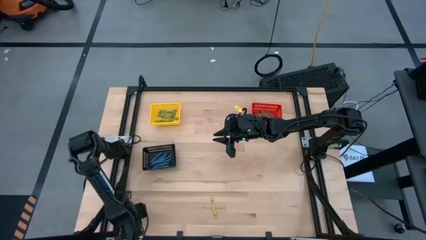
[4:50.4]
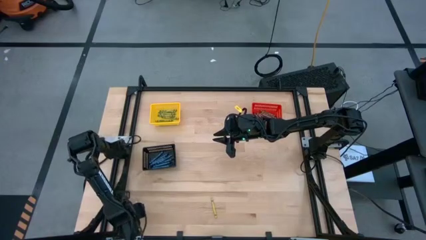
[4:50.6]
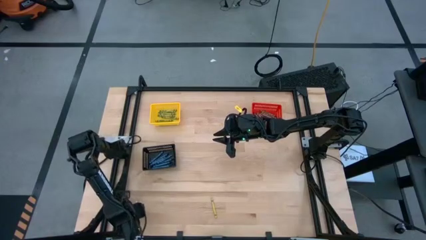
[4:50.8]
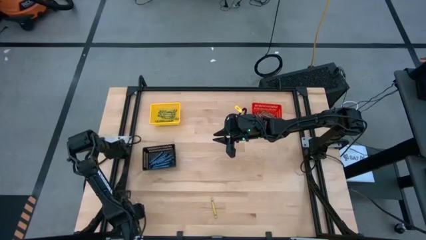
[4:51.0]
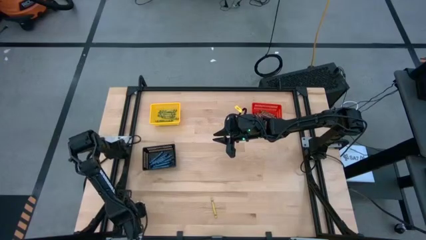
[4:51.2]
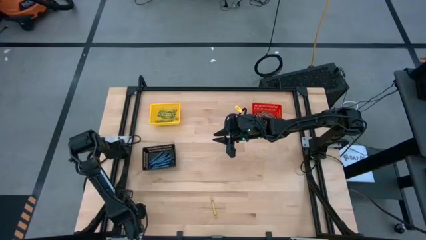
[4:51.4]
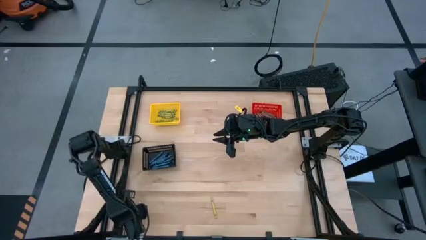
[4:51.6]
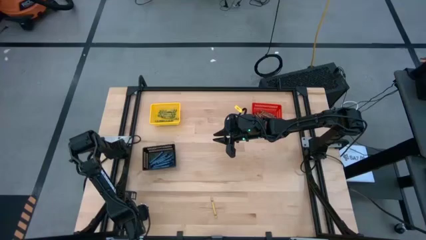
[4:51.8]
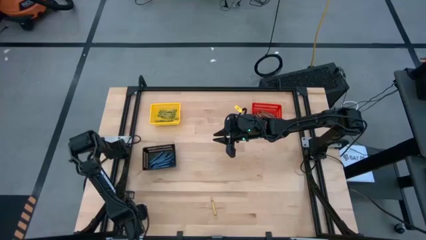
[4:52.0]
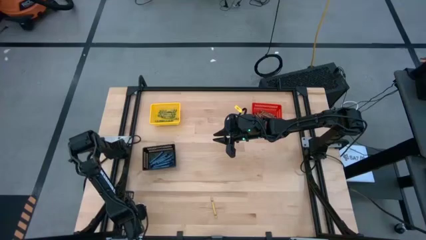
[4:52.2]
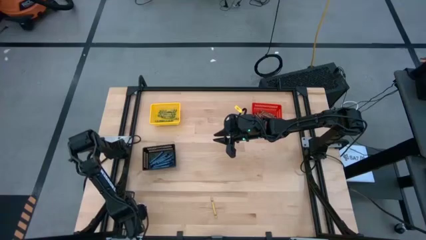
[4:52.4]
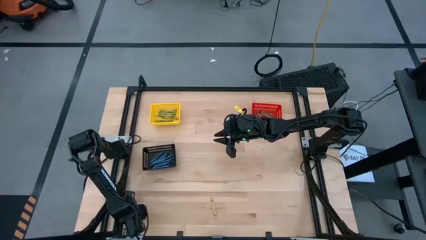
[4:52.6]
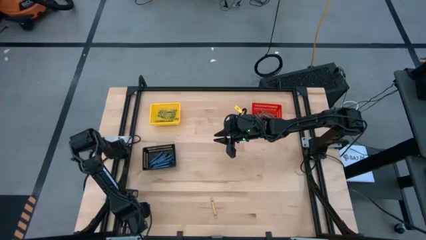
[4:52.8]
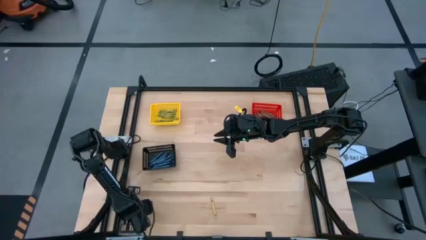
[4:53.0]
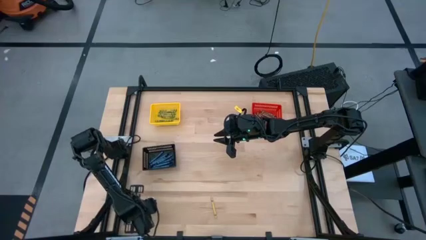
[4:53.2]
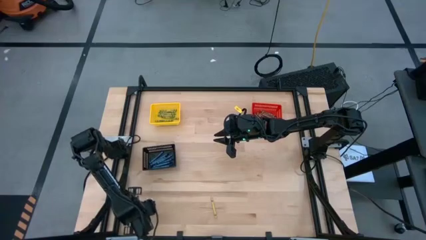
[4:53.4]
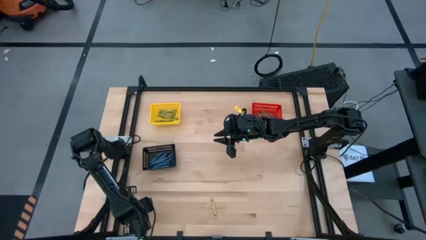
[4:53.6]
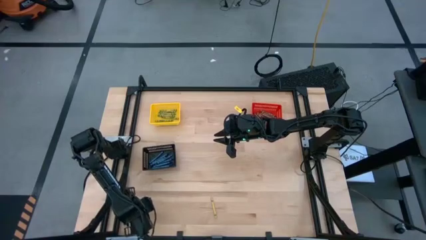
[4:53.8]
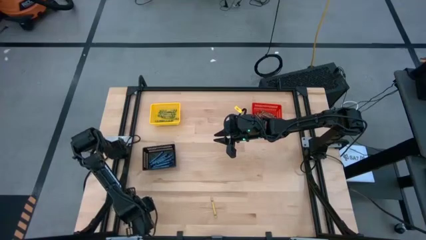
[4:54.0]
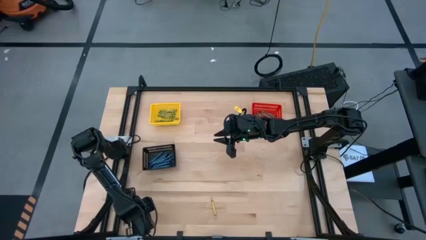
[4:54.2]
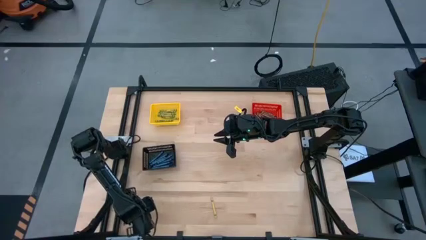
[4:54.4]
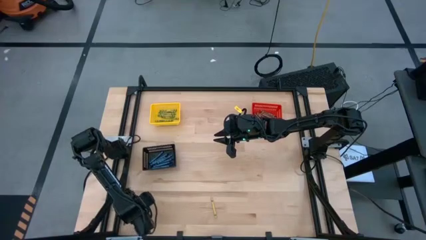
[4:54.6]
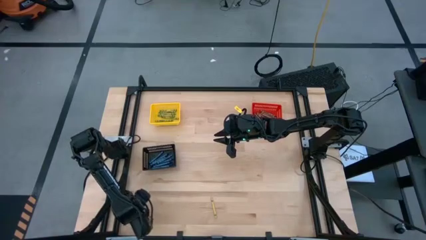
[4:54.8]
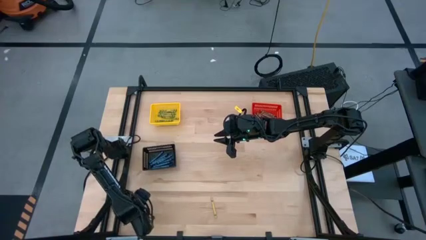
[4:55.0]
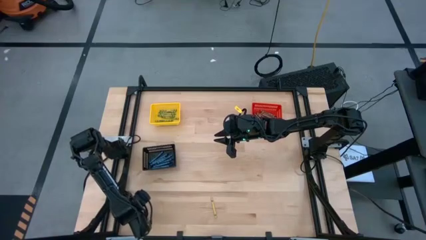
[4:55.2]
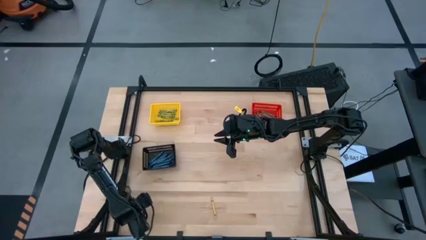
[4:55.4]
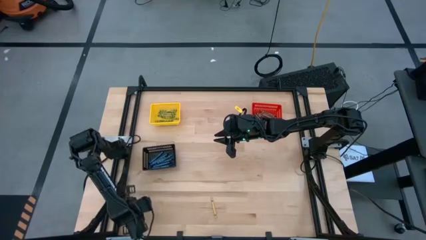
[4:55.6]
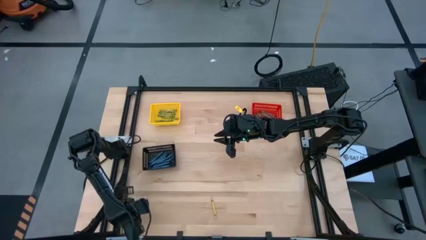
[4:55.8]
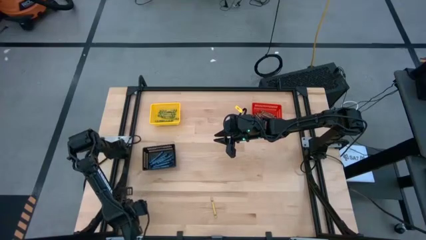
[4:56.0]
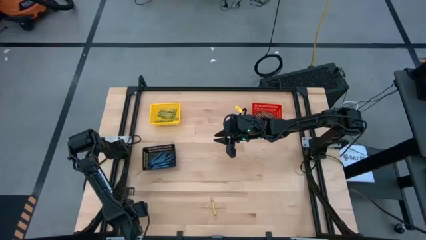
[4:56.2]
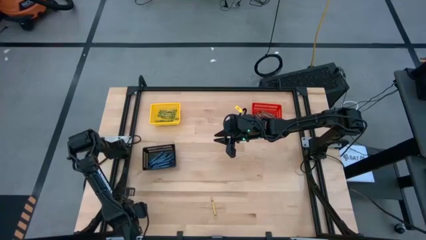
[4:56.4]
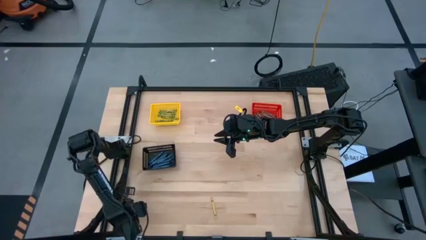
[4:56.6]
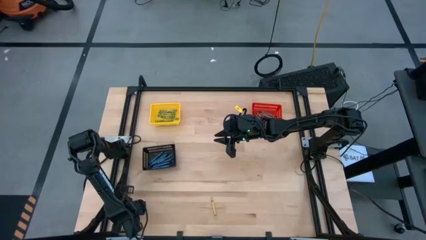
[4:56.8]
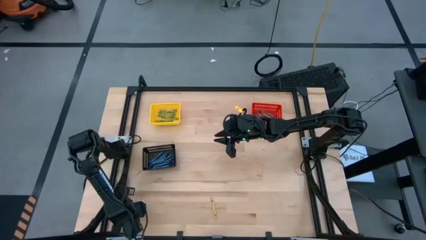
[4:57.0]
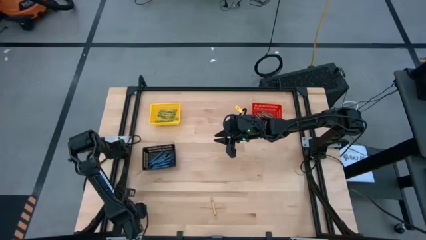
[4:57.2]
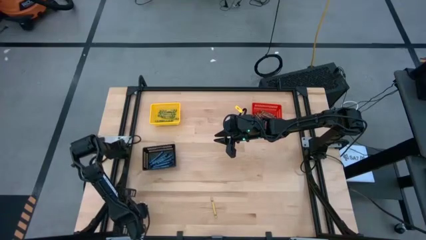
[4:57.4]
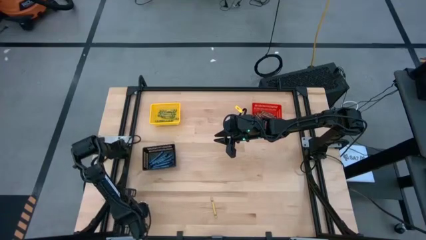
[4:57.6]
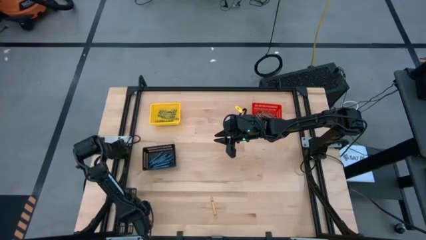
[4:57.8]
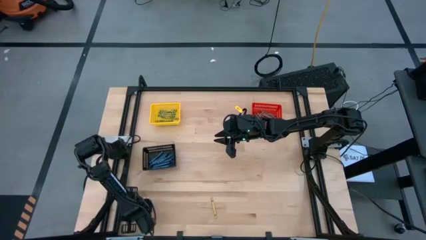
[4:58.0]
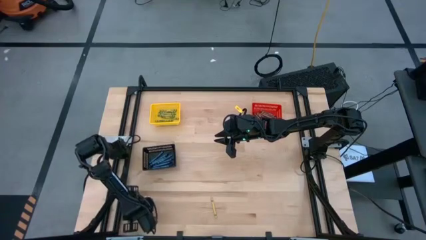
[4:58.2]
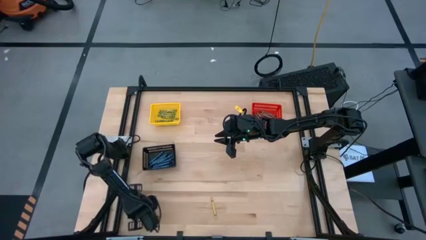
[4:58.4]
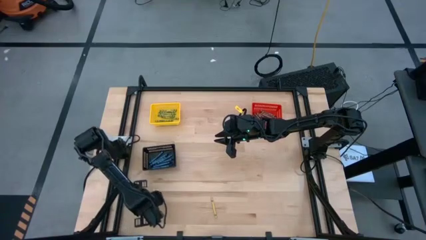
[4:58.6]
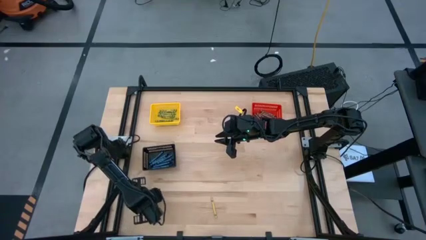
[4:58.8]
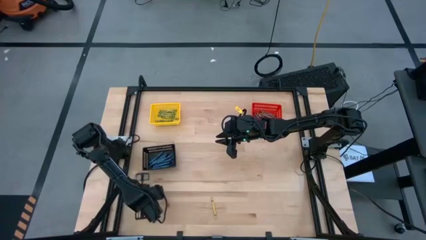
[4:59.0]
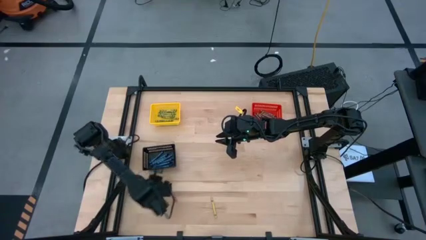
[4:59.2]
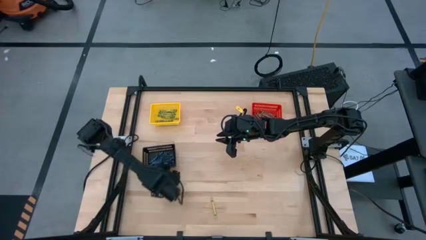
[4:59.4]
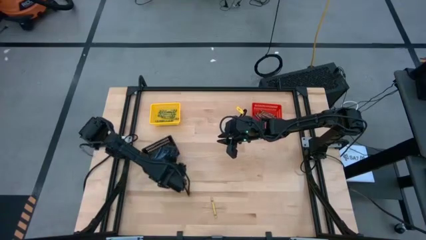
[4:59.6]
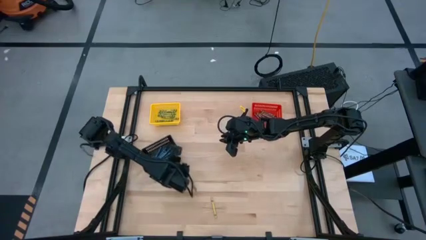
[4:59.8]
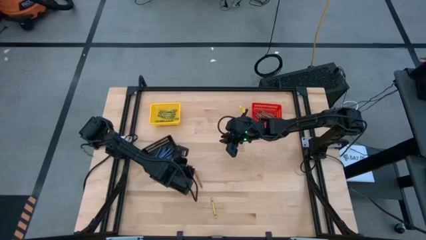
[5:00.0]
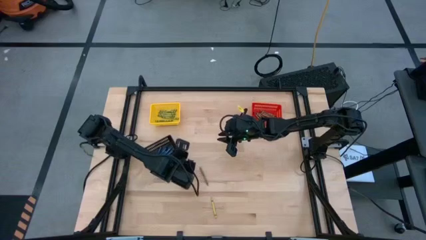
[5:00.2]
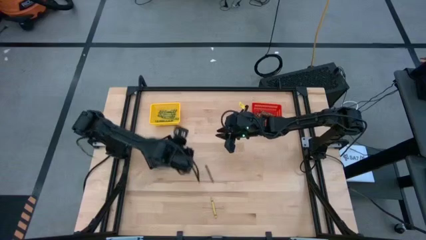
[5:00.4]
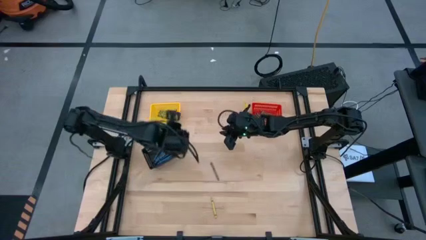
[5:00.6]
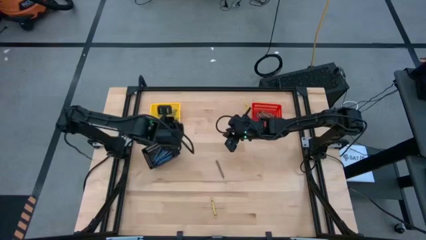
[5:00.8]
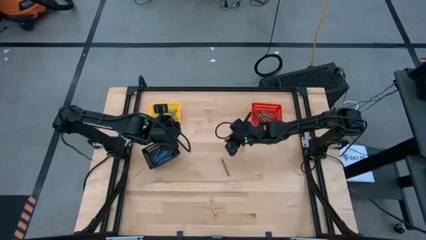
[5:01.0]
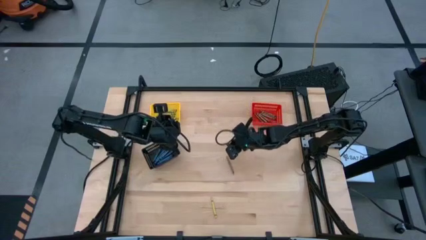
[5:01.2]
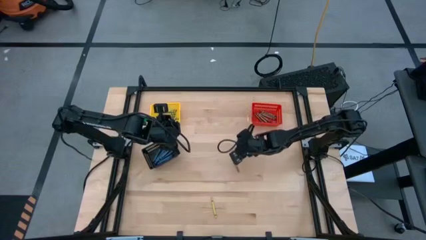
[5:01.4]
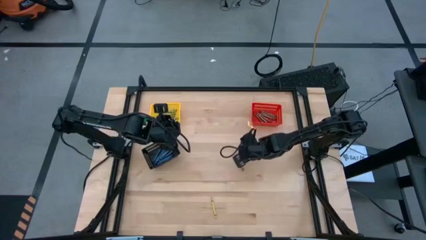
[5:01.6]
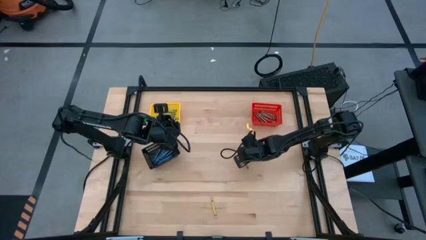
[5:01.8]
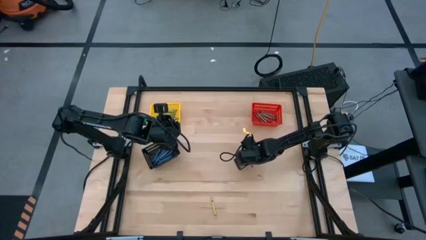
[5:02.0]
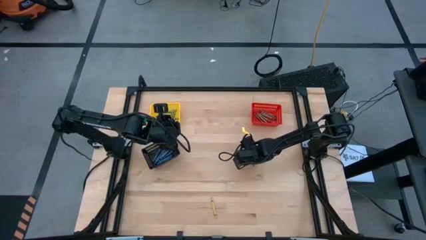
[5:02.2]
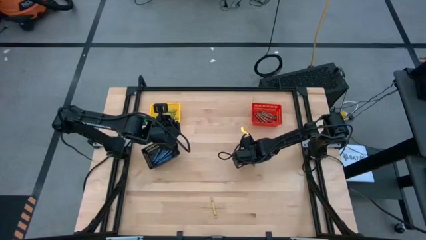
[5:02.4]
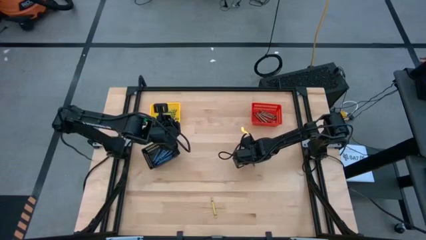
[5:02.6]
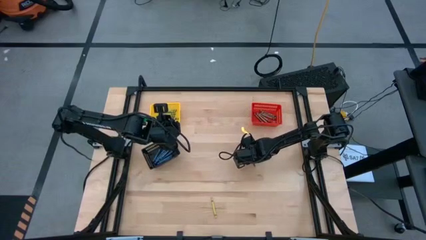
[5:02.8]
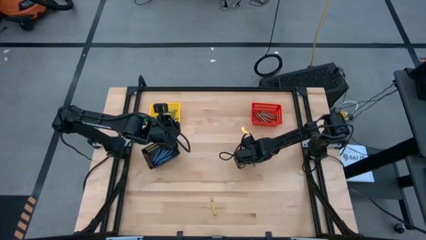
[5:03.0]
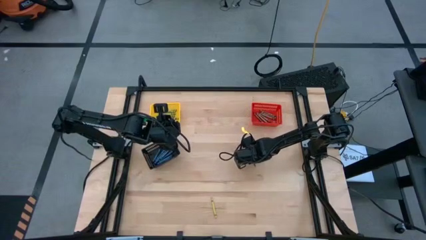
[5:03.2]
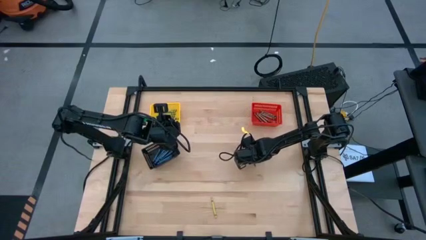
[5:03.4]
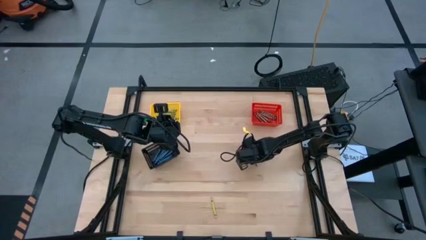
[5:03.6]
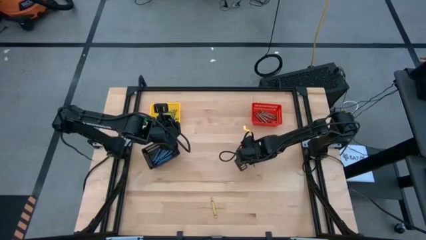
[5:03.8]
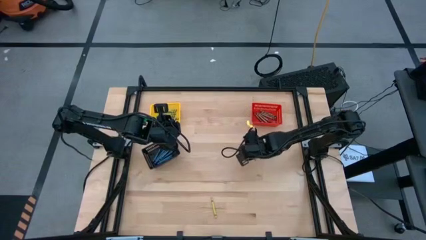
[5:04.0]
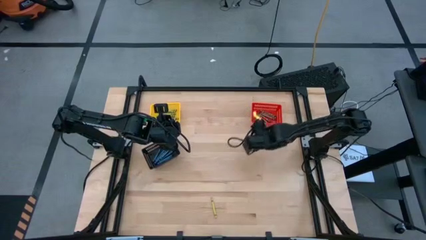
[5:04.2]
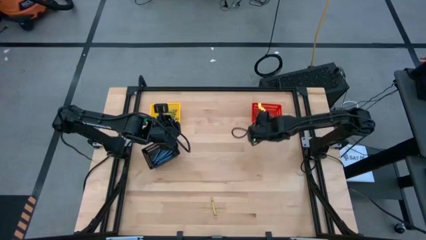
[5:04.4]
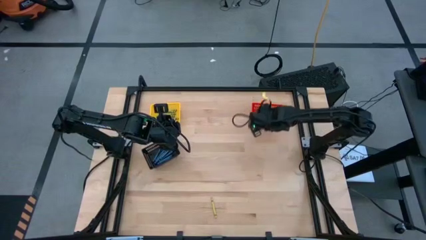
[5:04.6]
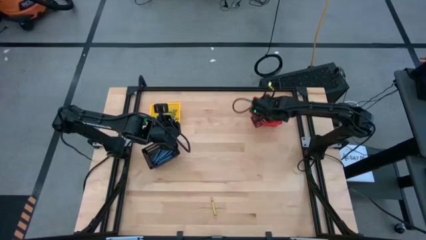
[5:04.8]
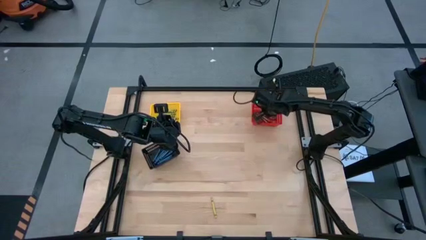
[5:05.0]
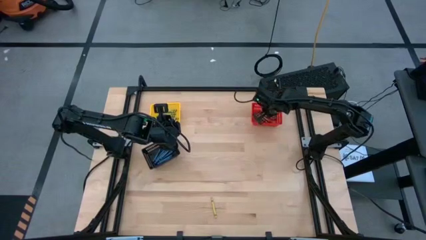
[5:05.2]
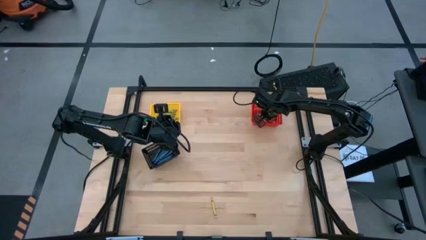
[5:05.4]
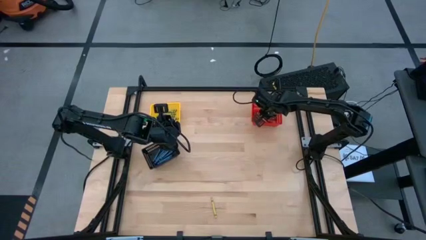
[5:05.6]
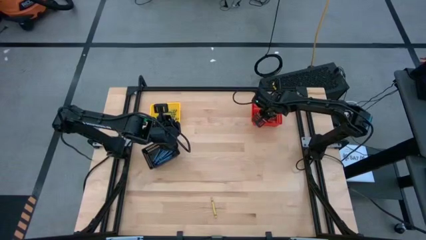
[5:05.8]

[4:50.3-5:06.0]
Task: Sort crayons
Put the brown crayon into the red bin
